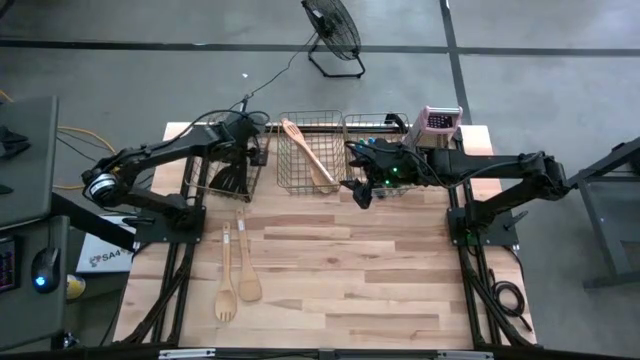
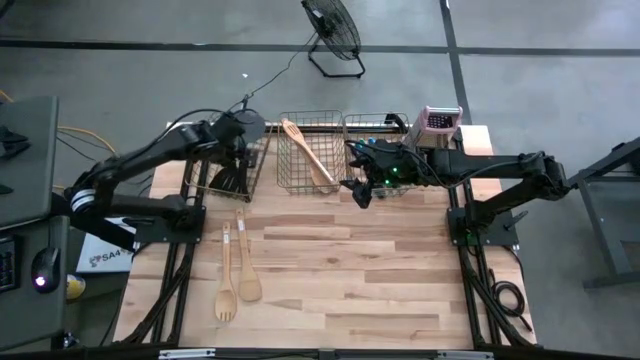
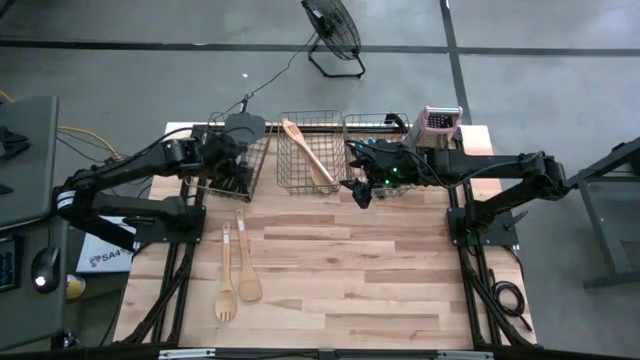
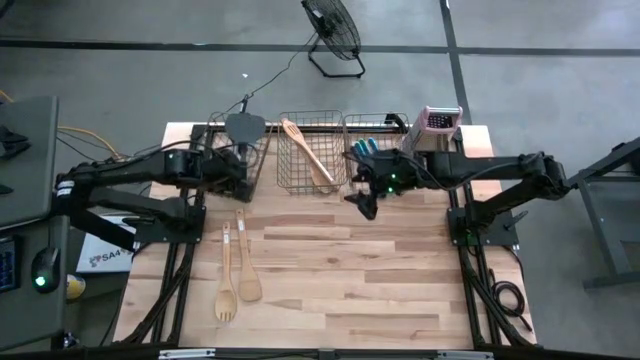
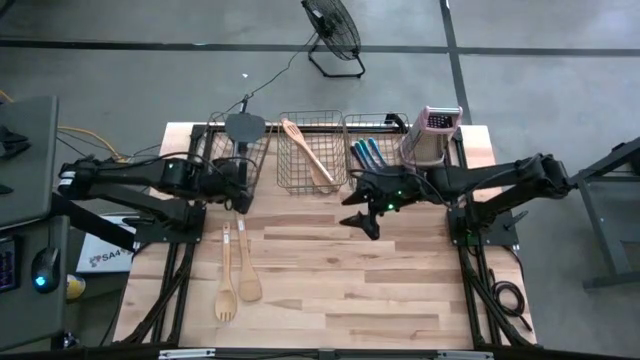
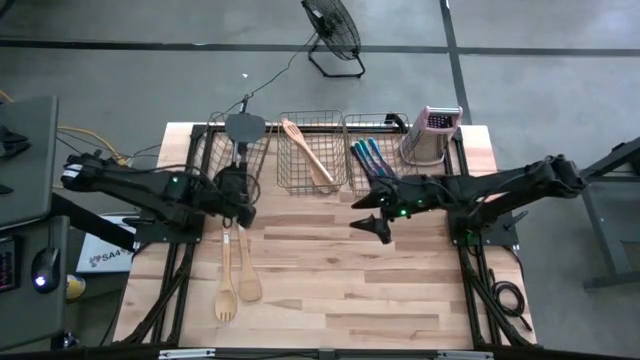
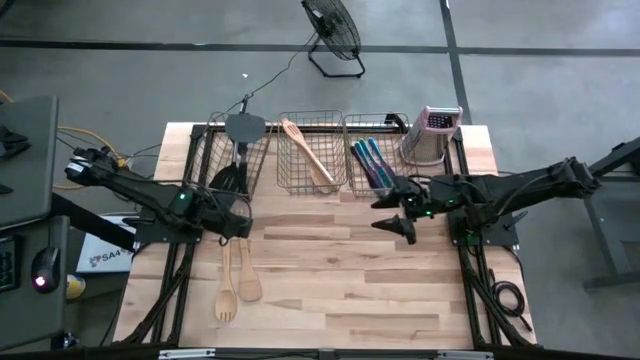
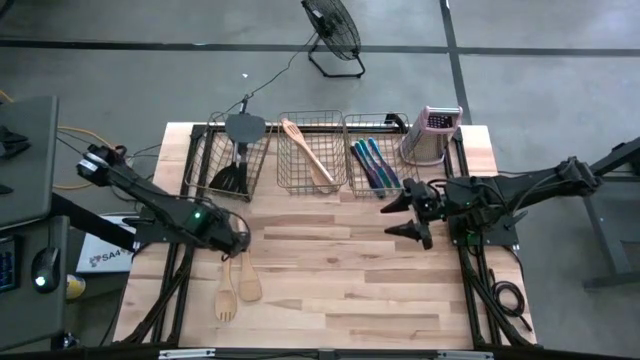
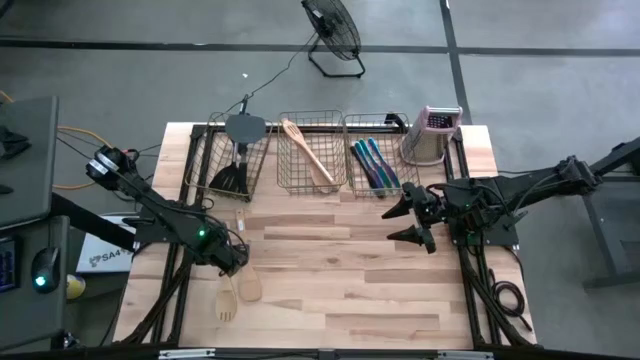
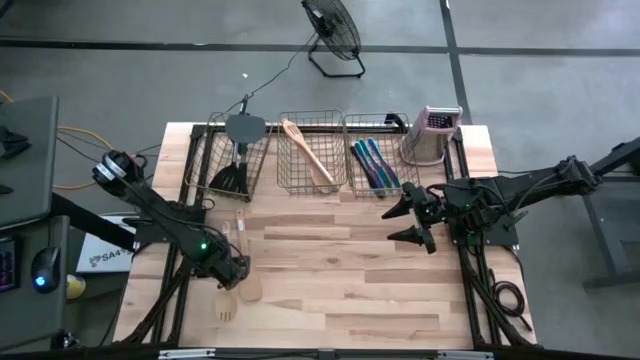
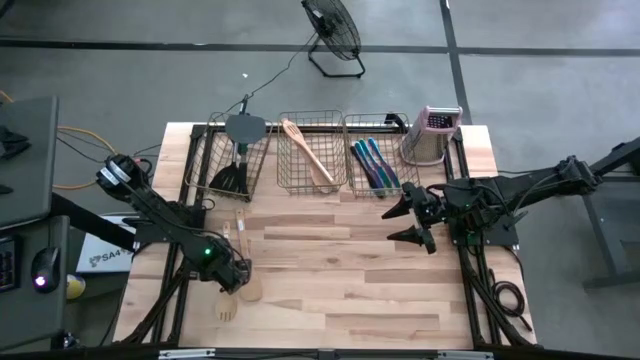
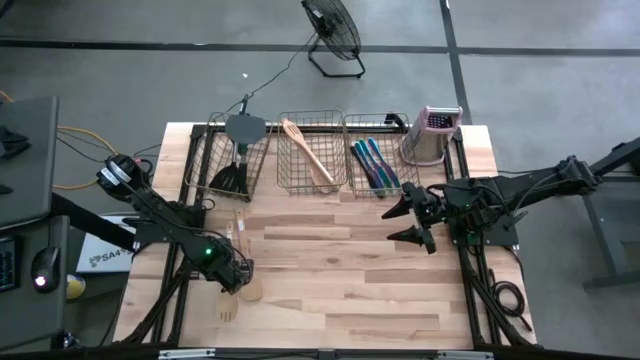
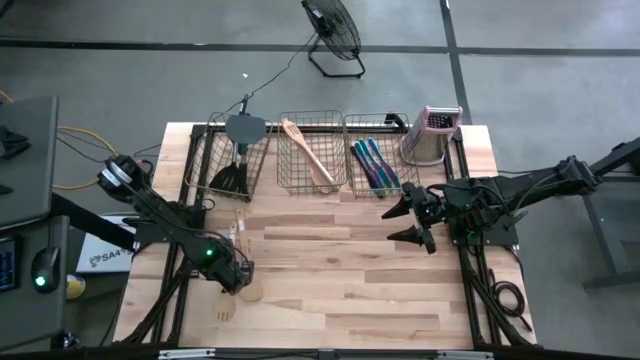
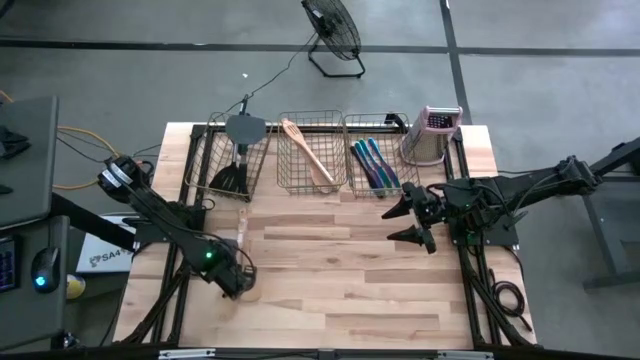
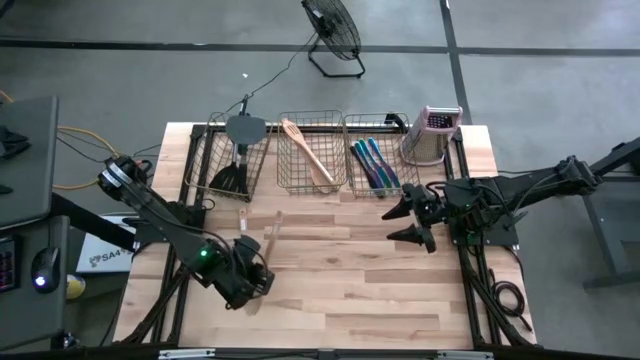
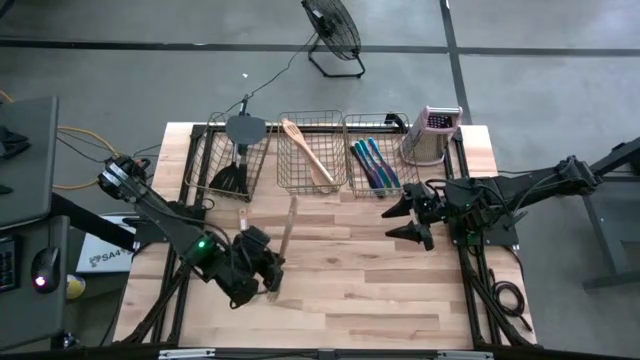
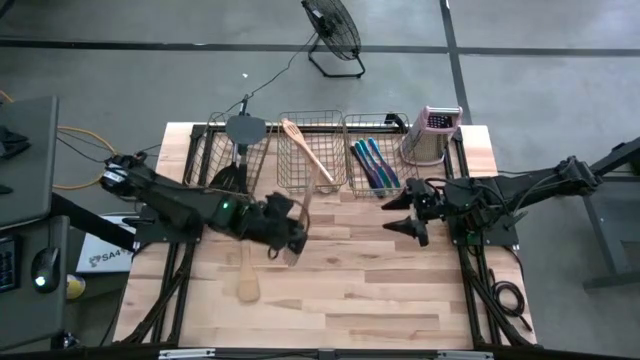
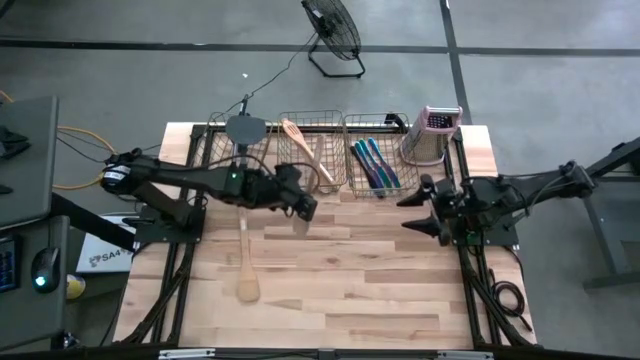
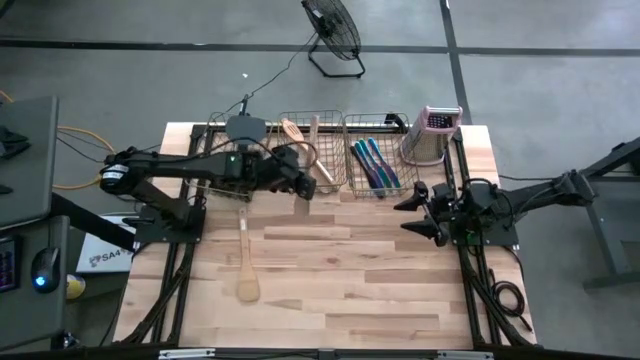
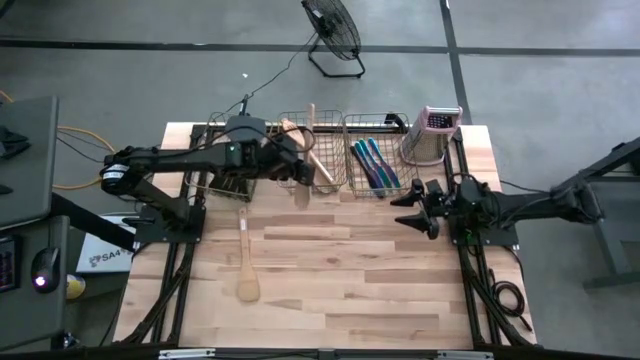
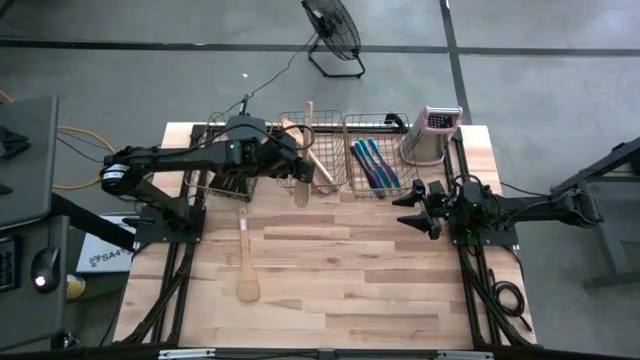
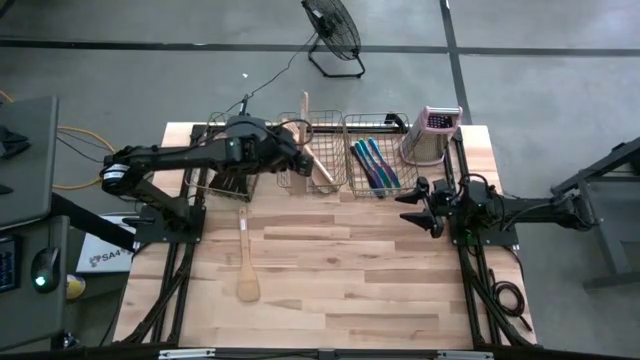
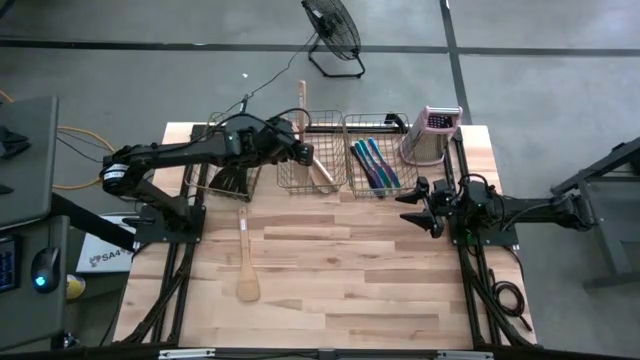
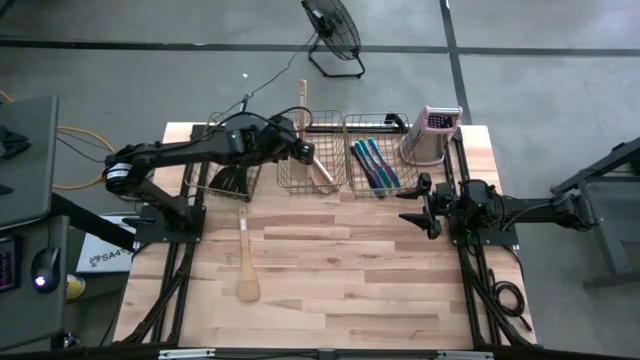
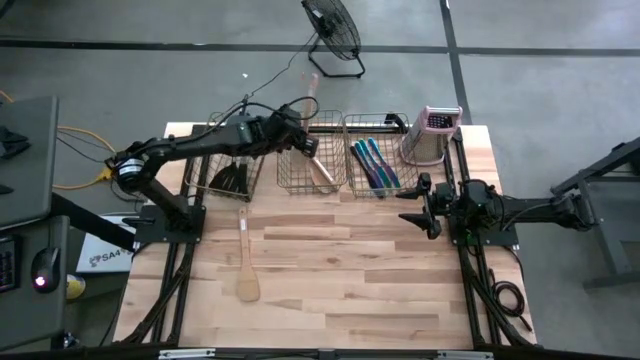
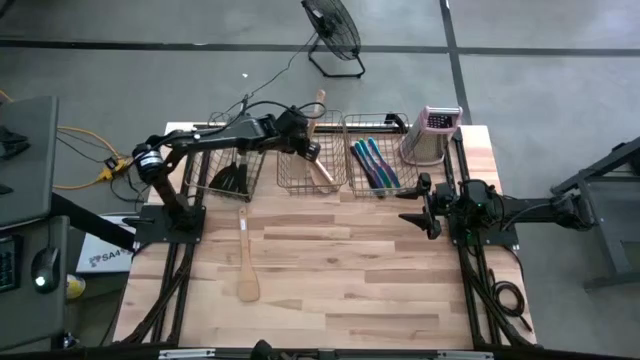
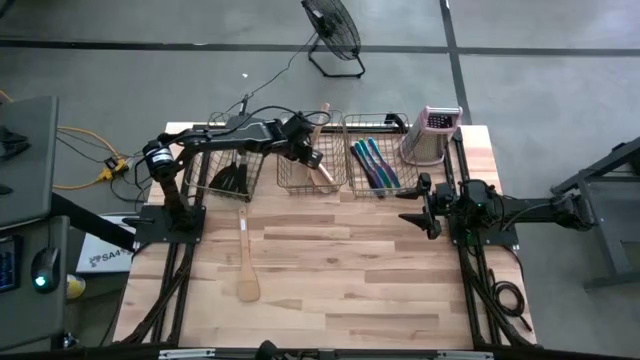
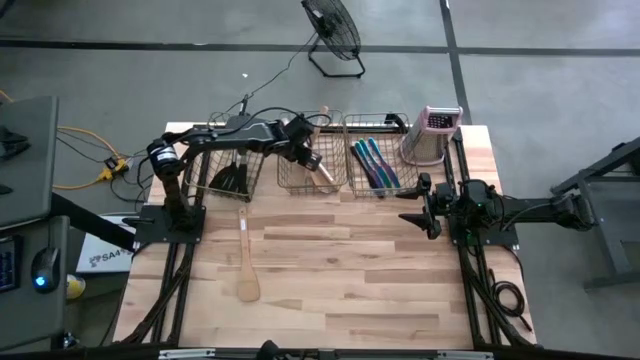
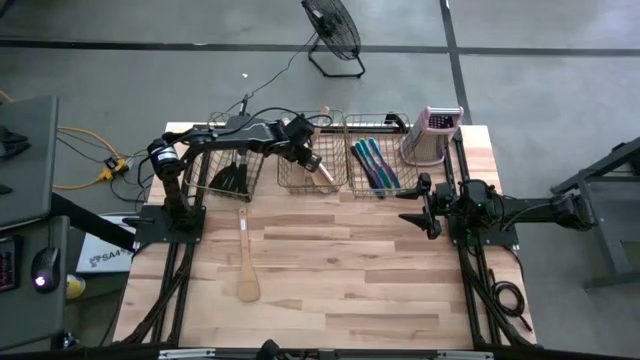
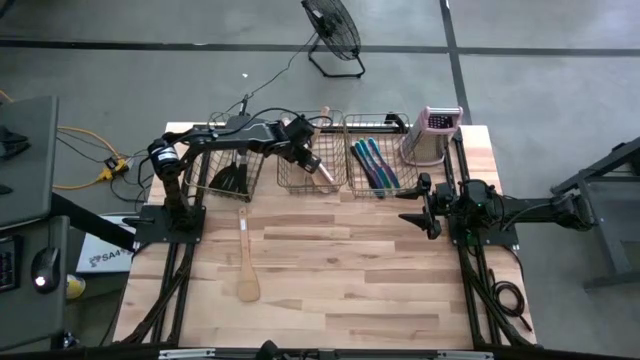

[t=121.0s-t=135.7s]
Task: Pick & Place Kitchen Items
Put the brown serving spoon into the middle wire basket

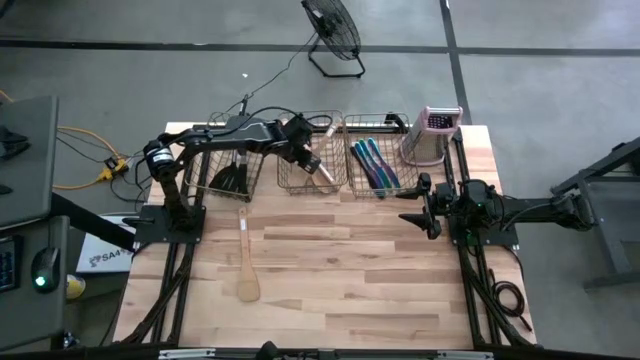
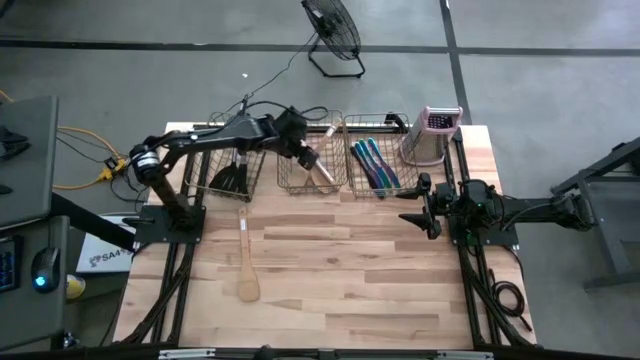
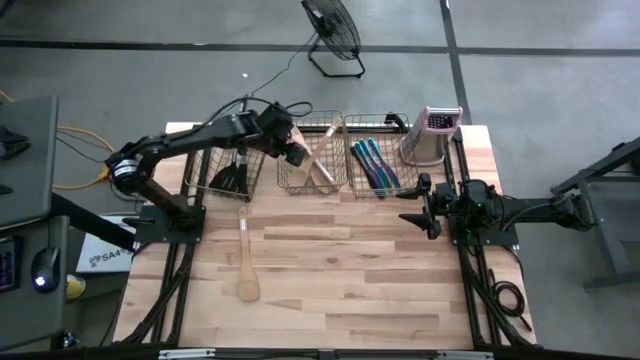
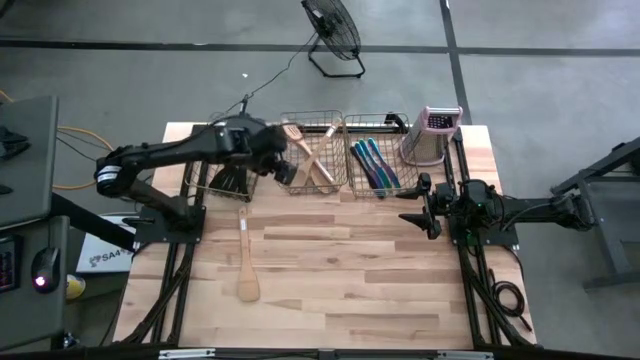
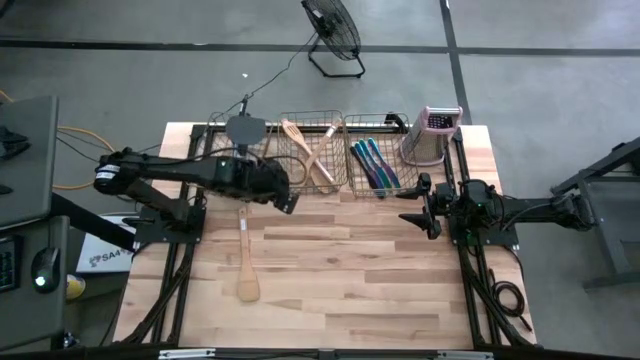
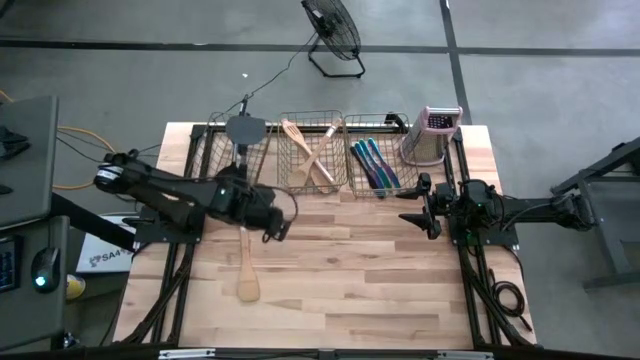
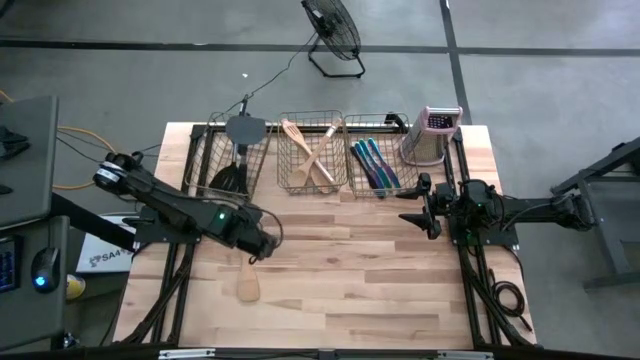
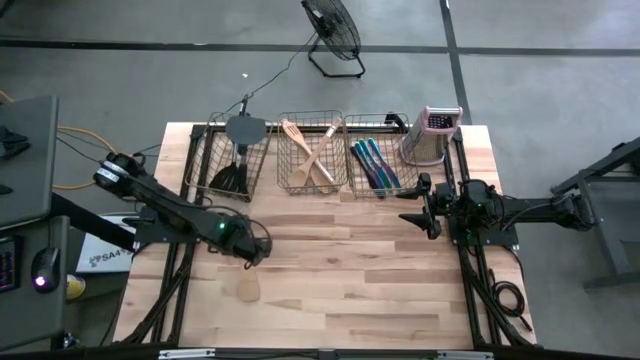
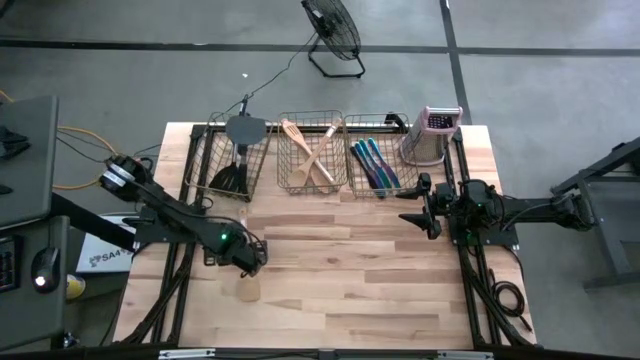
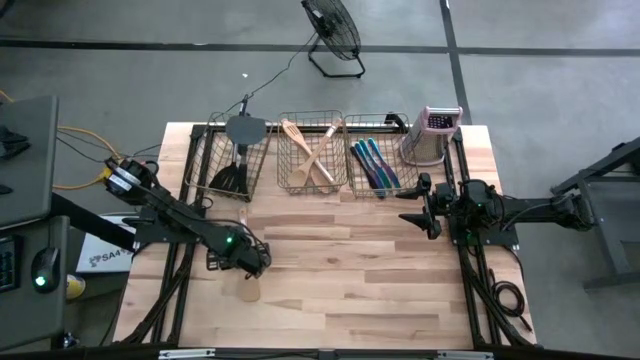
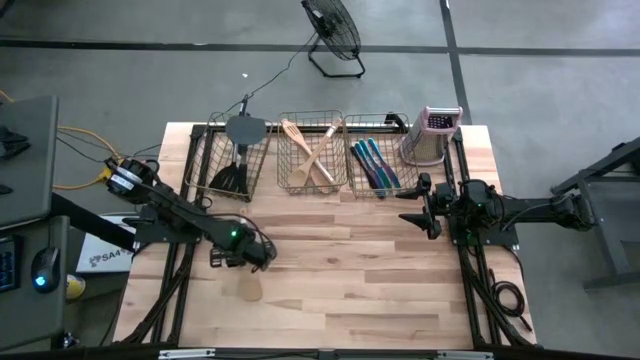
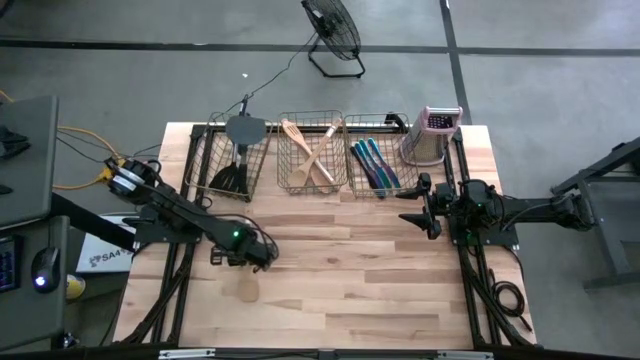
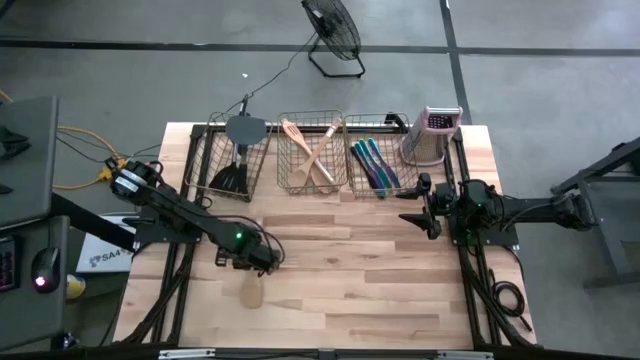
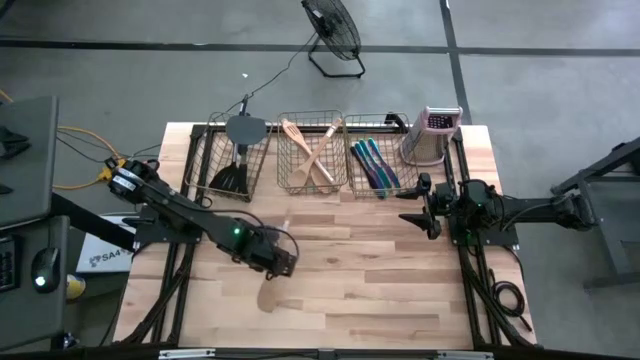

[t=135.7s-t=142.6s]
Put the brown serving spoon into the middle wire basket
